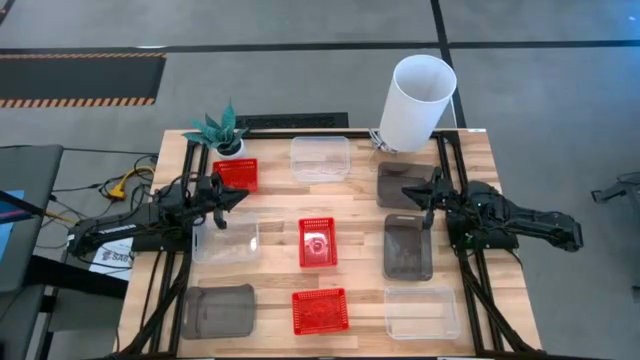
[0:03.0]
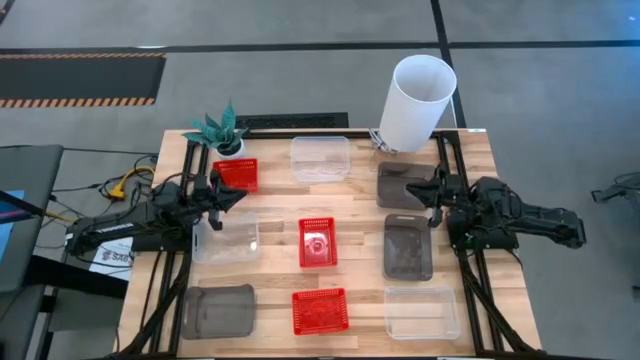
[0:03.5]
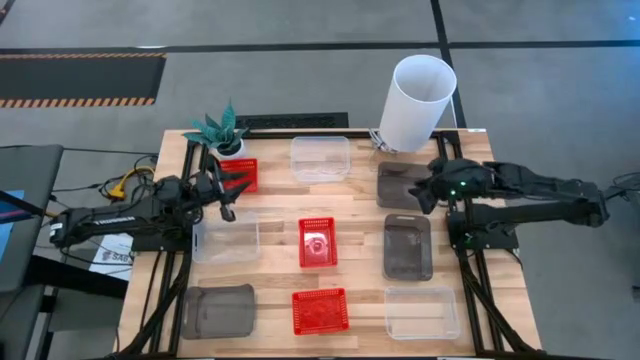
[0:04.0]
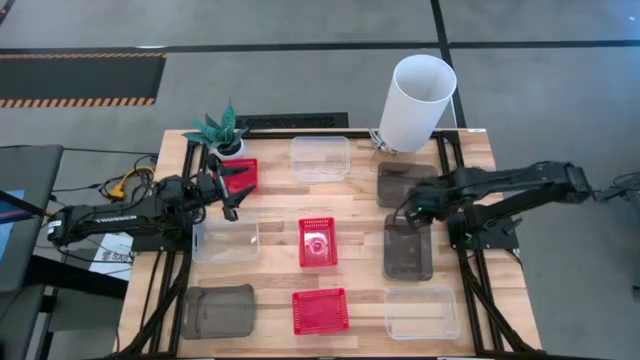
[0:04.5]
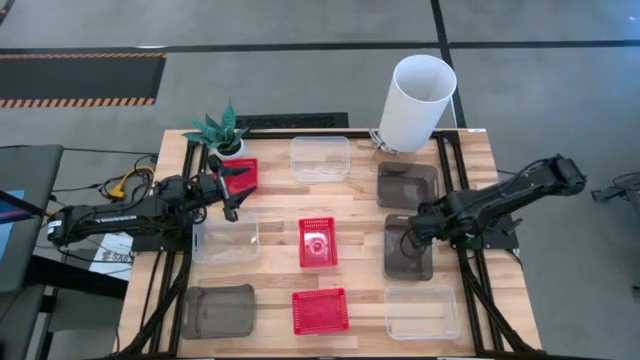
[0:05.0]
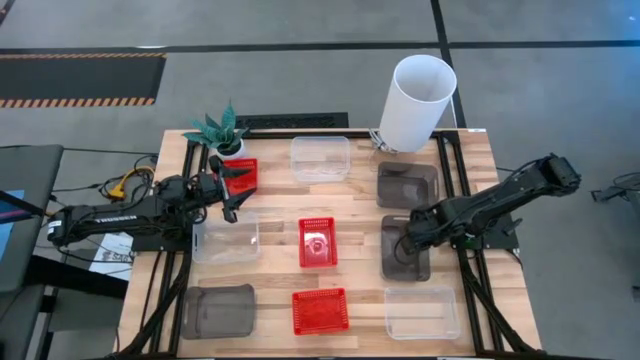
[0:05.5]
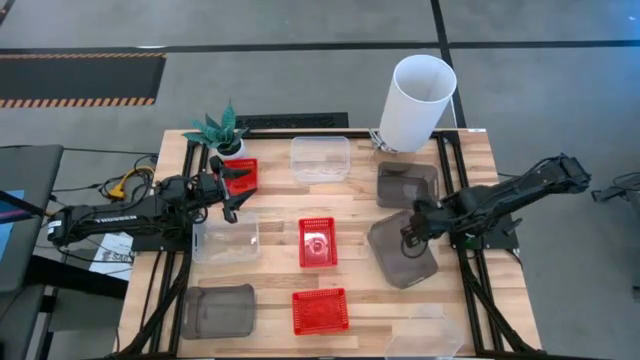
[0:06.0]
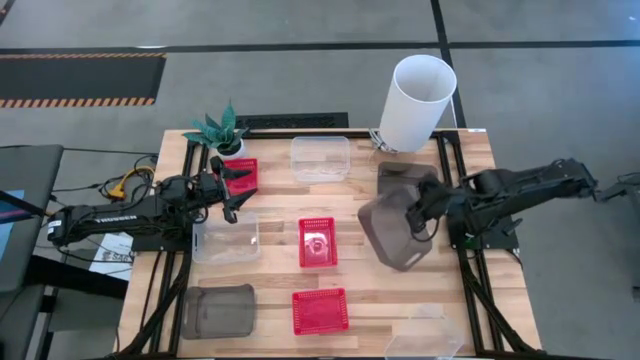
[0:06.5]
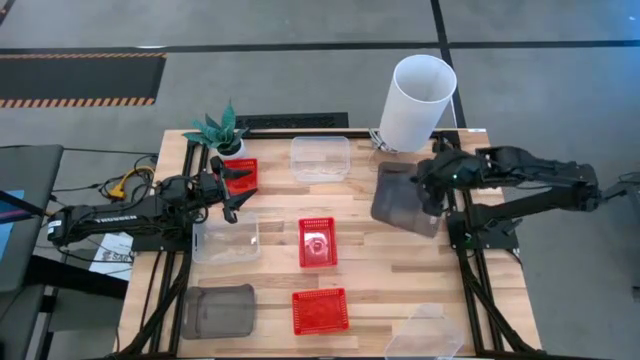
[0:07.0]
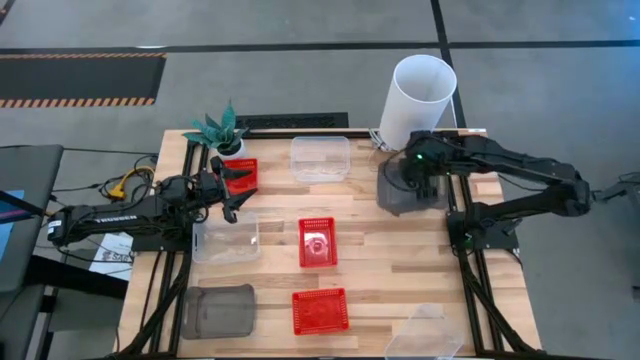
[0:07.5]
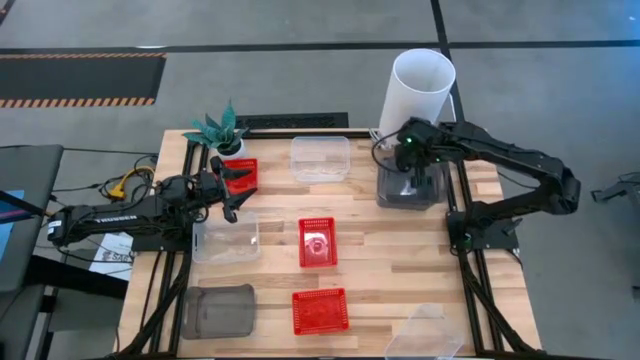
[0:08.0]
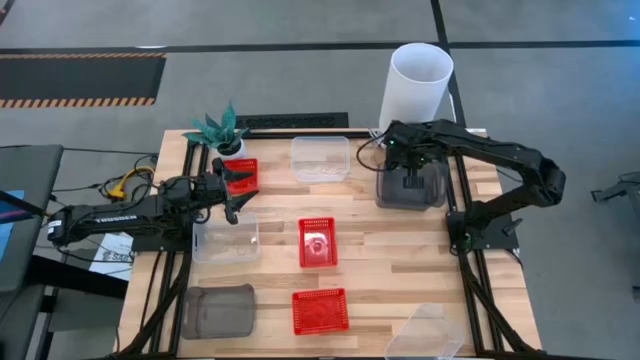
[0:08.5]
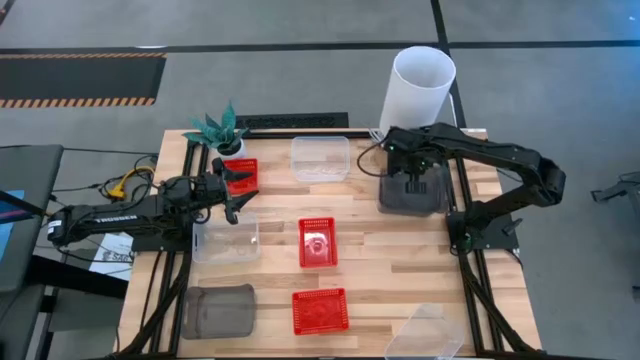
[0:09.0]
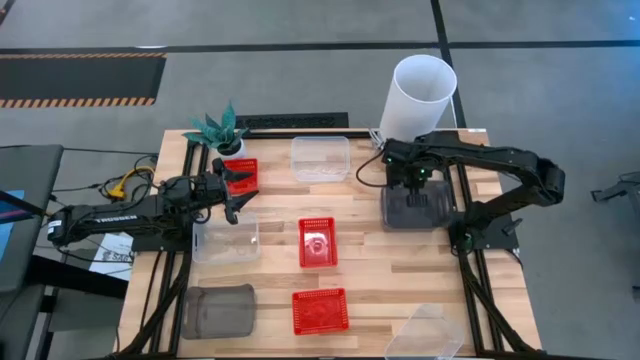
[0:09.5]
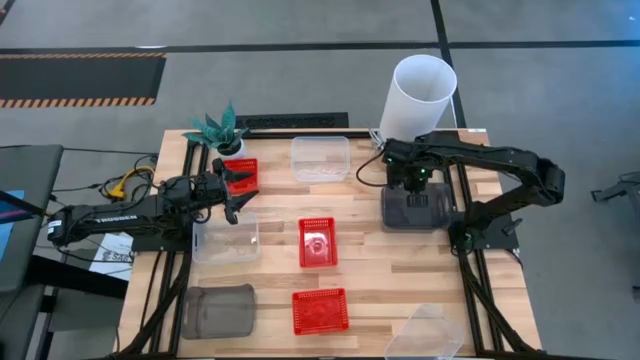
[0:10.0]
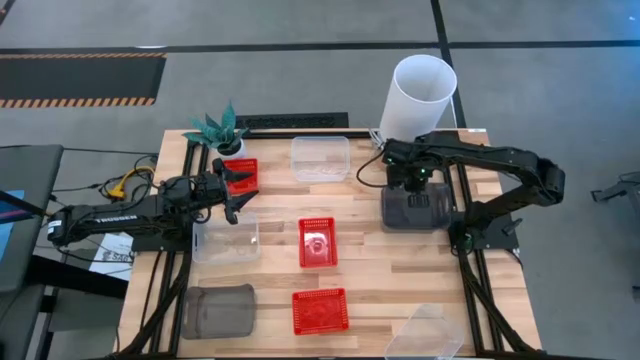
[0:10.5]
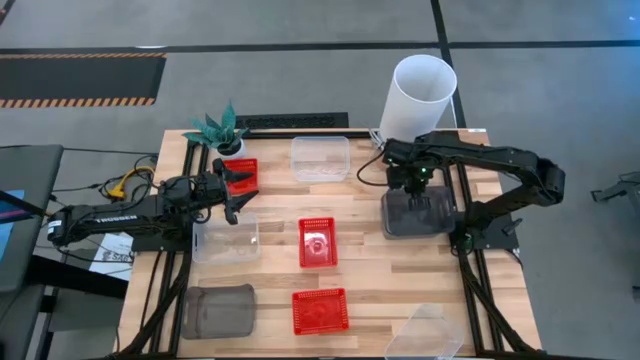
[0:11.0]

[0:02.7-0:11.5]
Stack the right black bin on top of the top gray bin

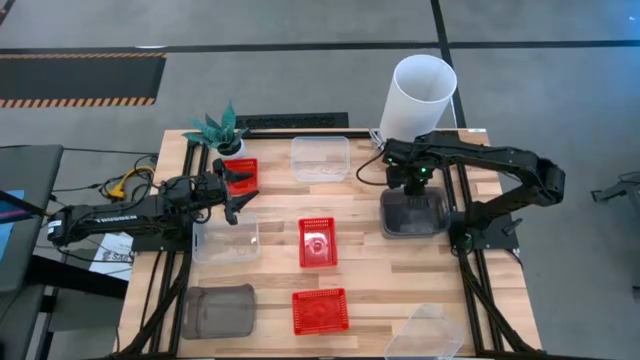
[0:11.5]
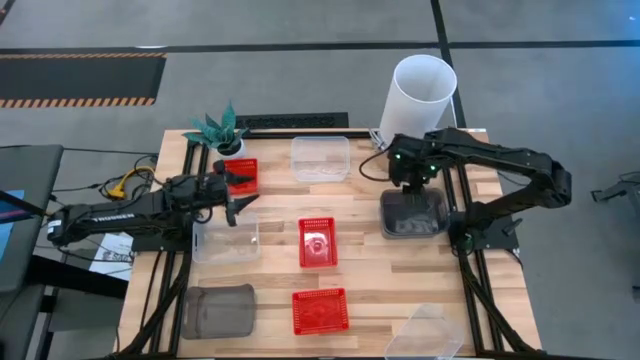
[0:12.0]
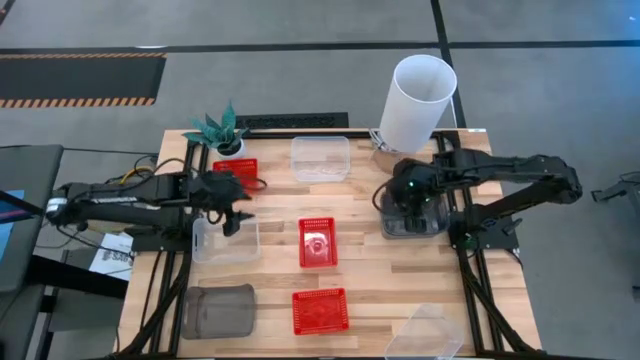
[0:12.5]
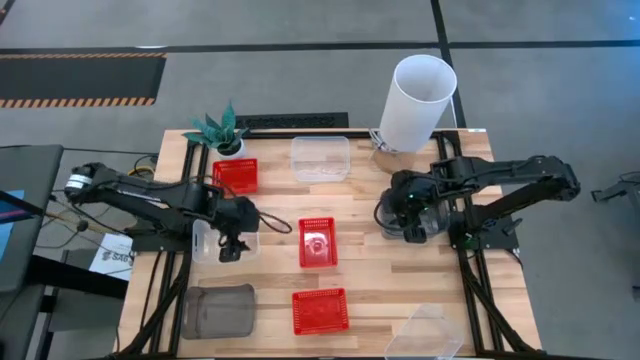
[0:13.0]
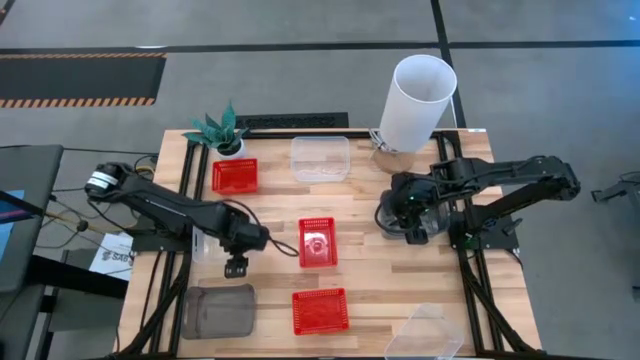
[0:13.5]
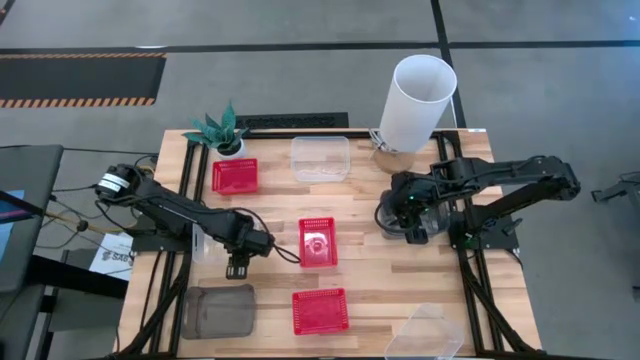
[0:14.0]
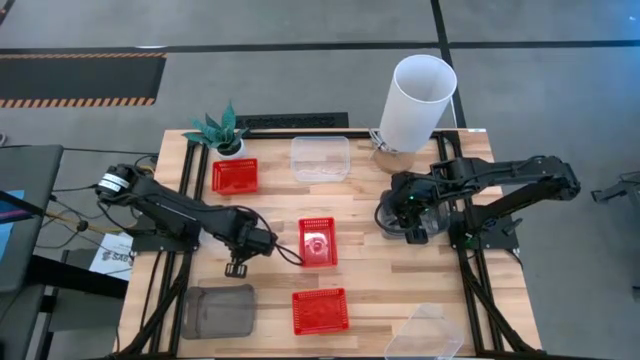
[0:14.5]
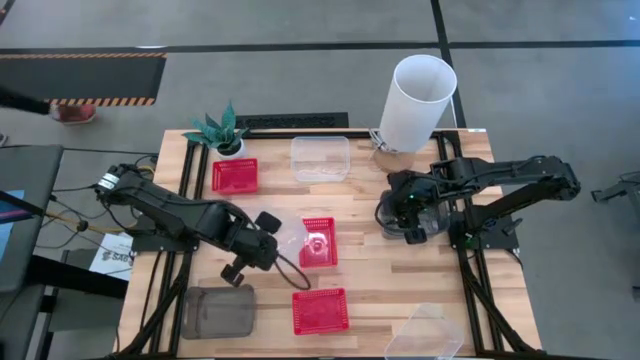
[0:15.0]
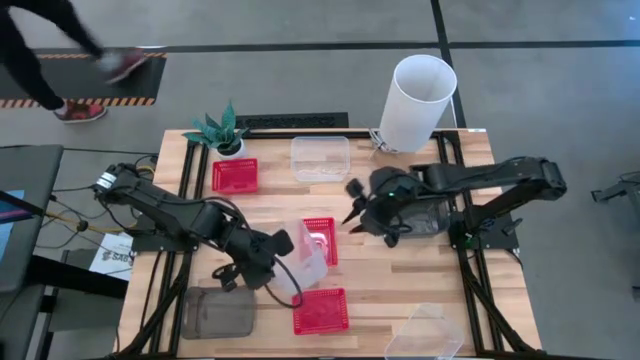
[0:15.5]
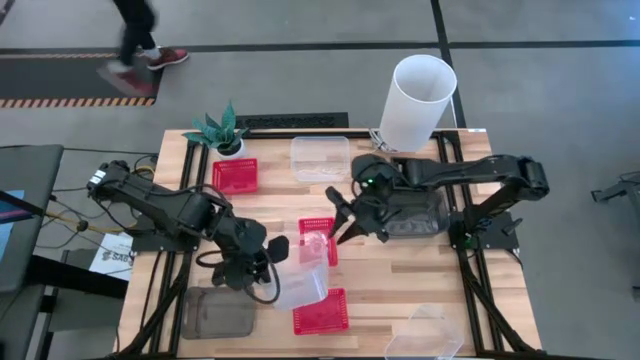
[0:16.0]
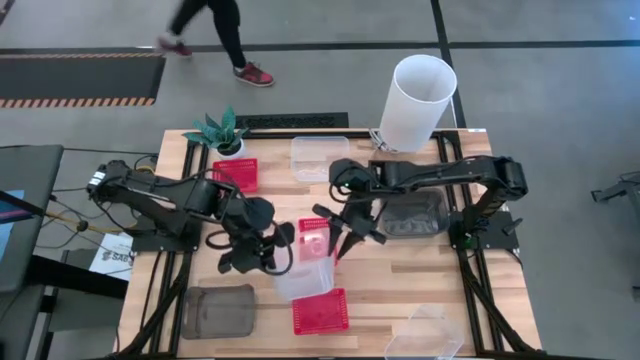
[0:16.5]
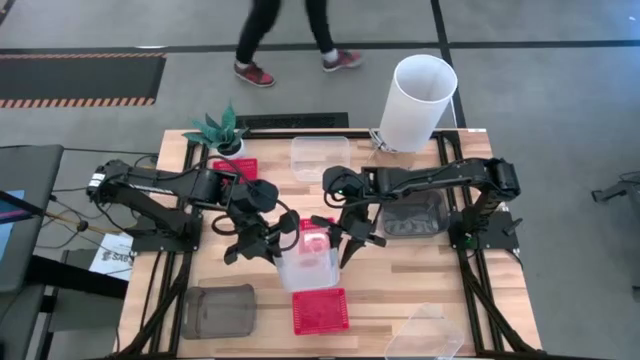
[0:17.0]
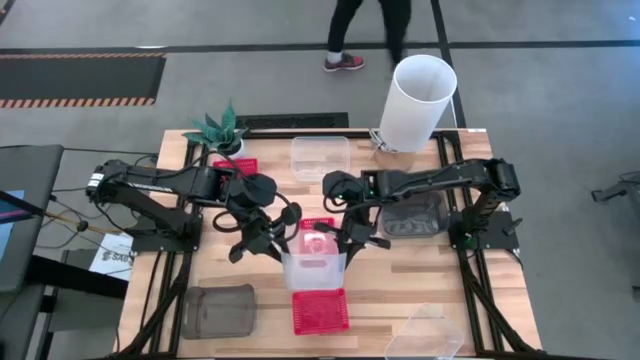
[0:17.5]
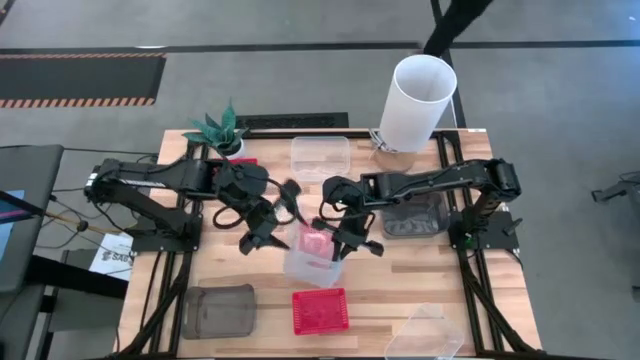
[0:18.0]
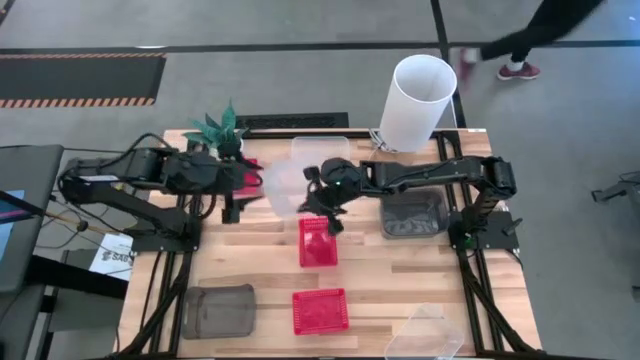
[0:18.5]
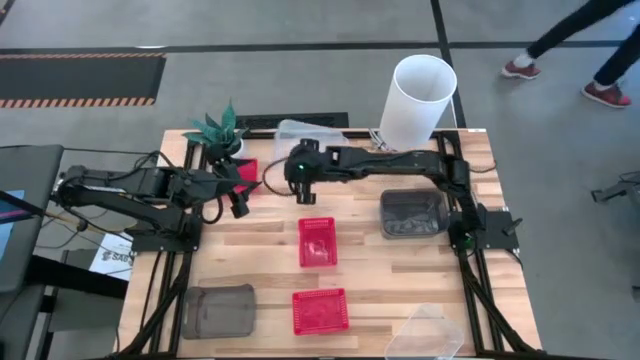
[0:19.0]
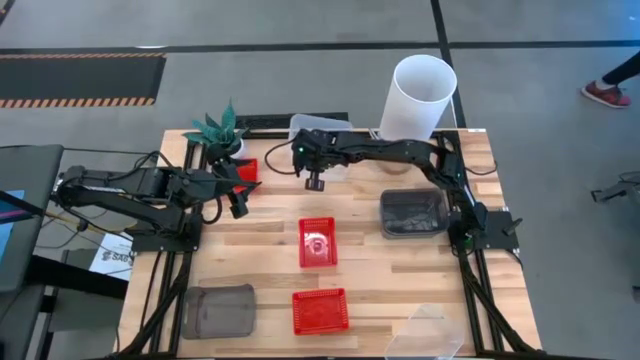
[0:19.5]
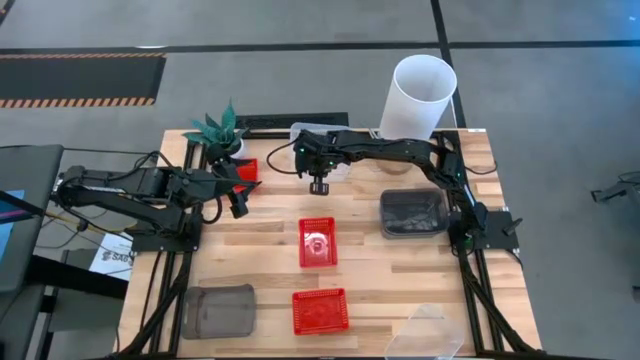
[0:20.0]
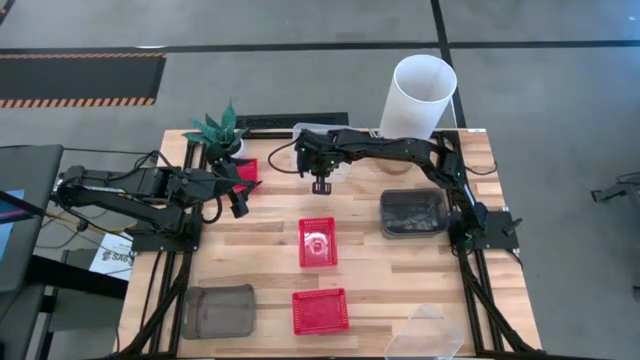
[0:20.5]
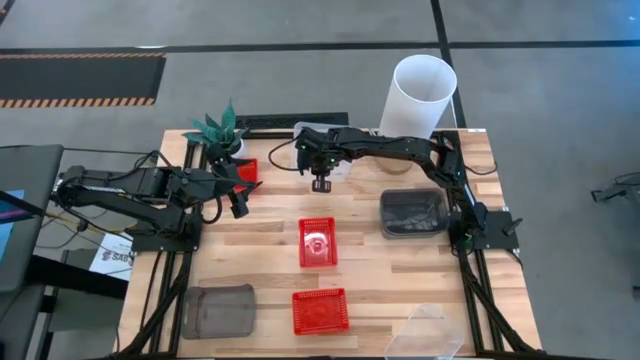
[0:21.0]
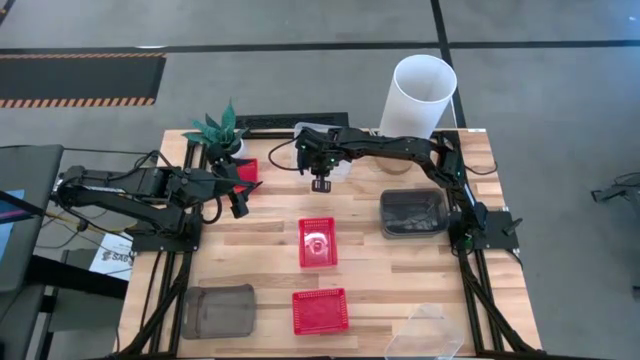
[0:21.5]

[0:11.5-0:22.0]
Stack the left transparent bin on top of the top transparent bin

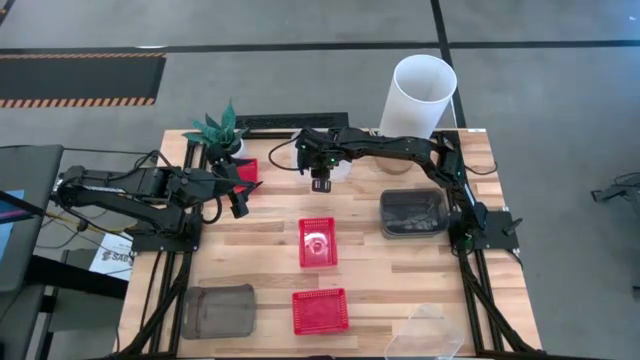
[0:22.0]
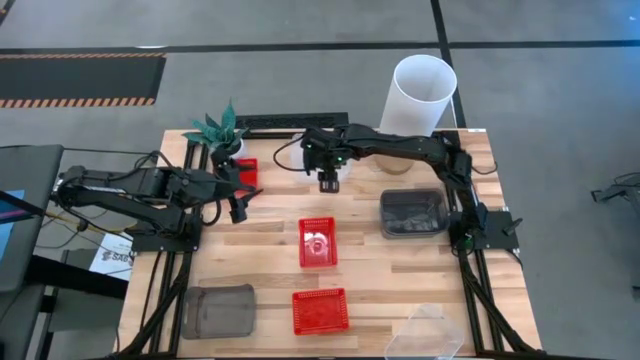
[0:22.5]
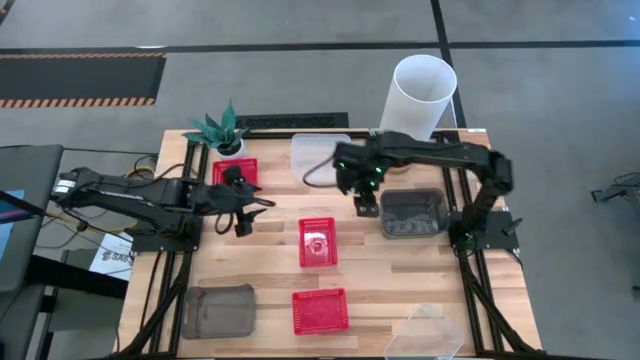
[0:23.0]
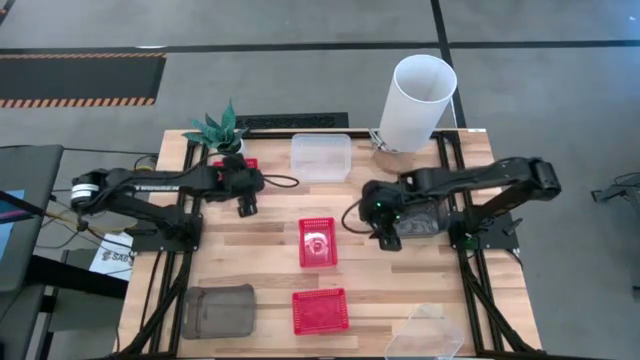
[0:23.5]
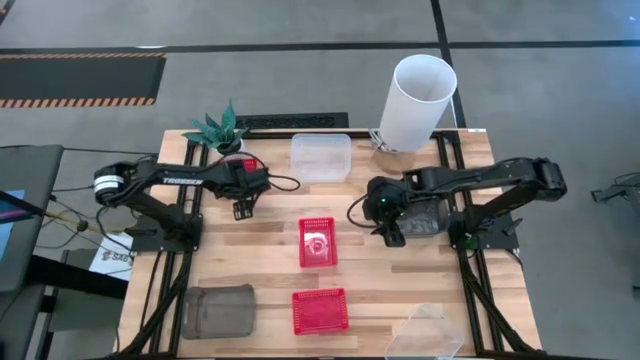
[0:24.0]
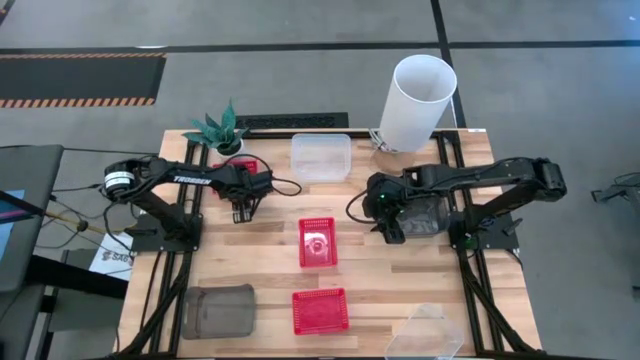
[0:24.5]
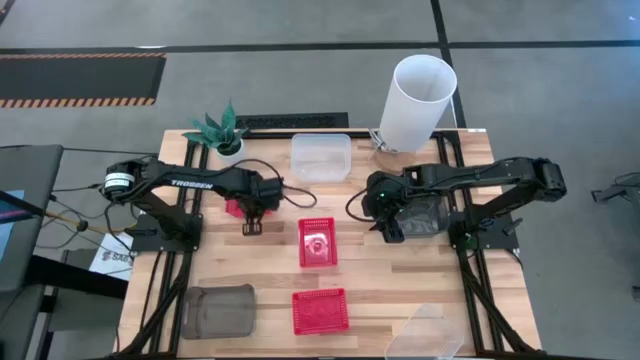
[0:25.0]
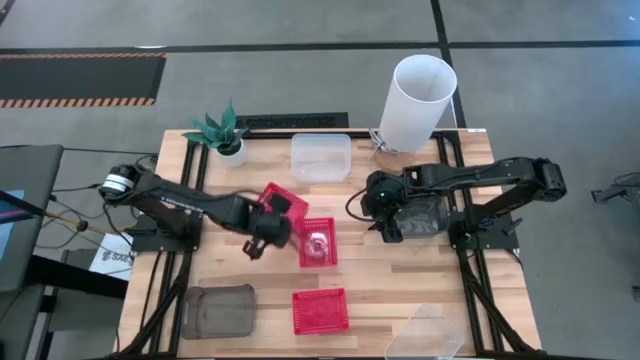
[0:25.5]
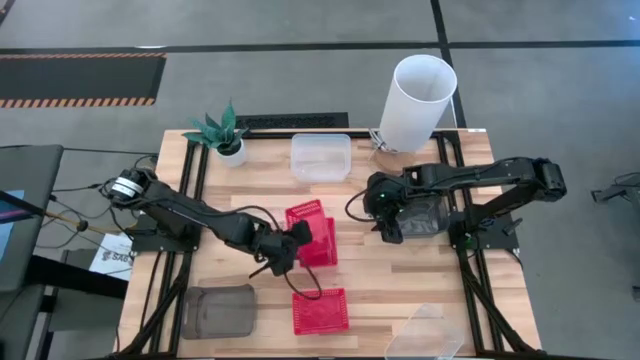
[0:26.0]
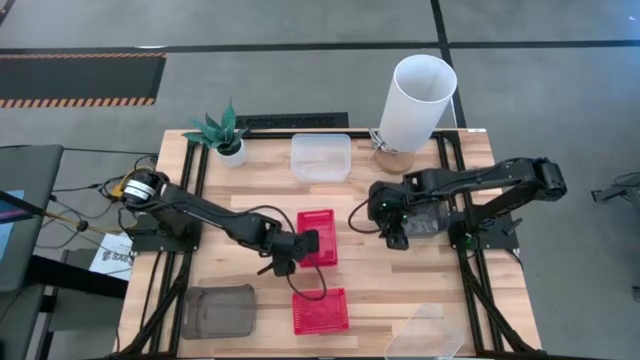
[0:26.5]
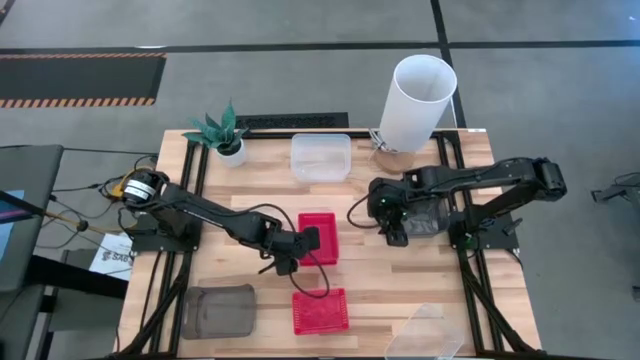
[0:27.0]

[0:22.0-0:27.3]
Stack the top left red bin on top of the middle red basket
